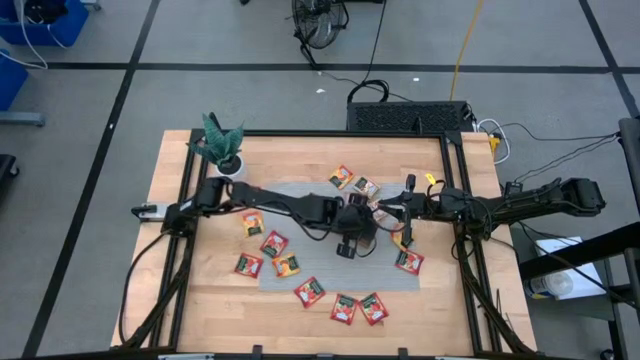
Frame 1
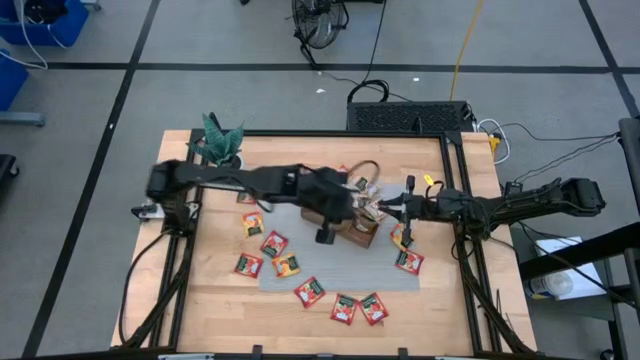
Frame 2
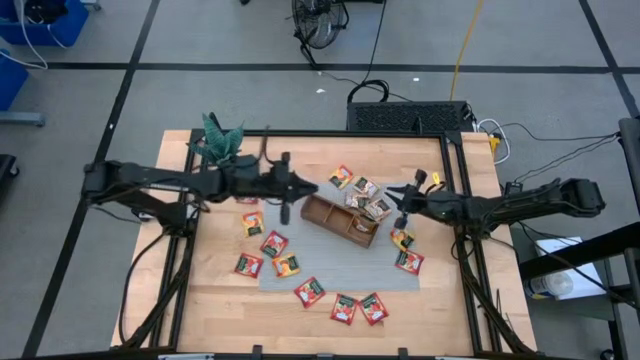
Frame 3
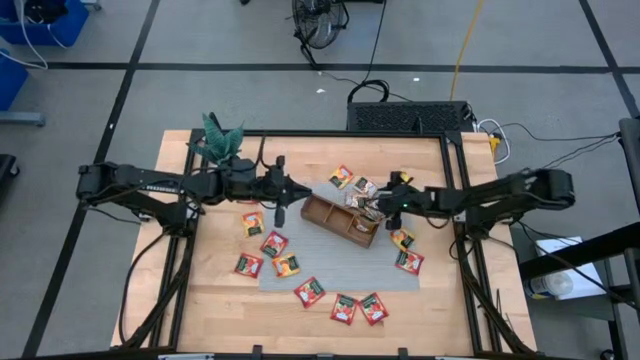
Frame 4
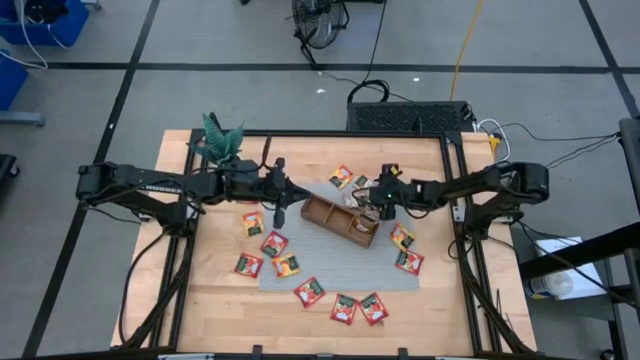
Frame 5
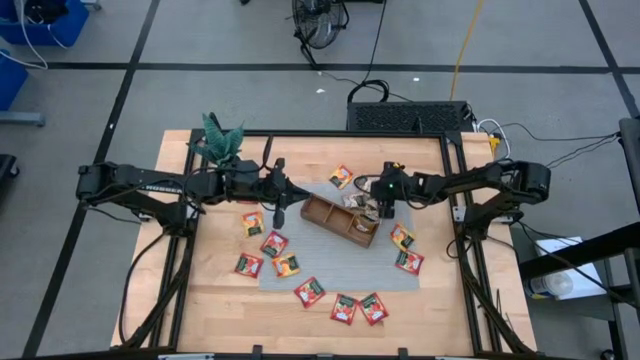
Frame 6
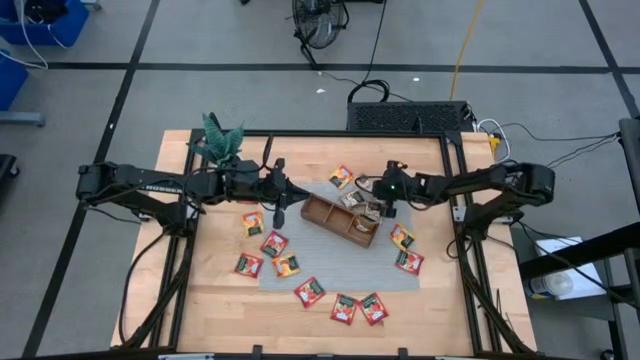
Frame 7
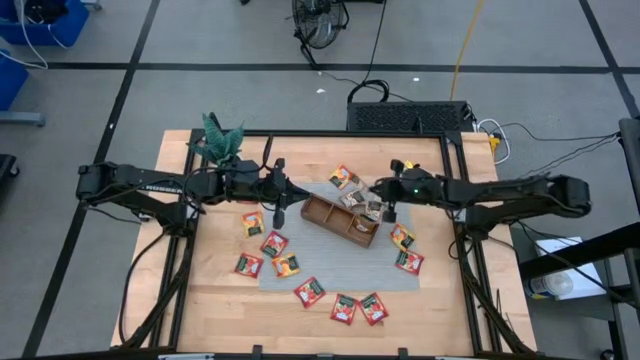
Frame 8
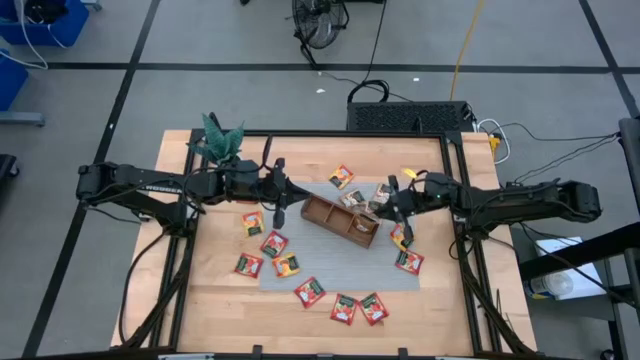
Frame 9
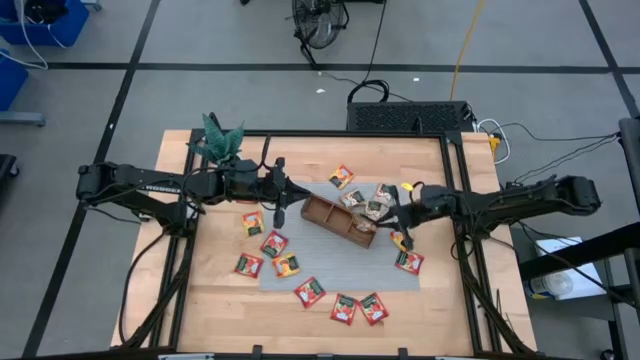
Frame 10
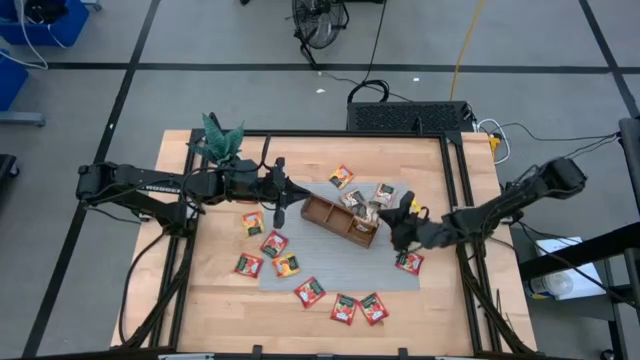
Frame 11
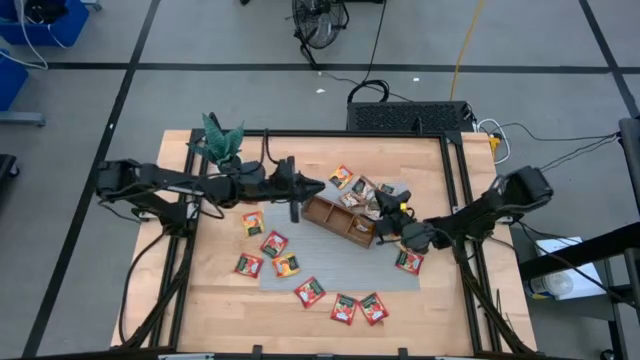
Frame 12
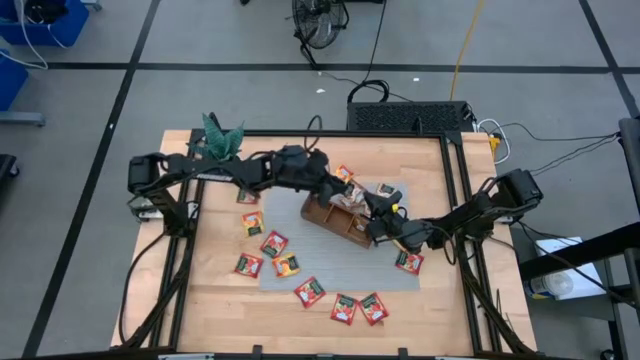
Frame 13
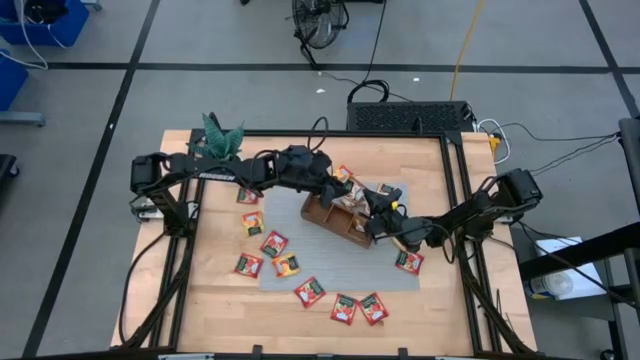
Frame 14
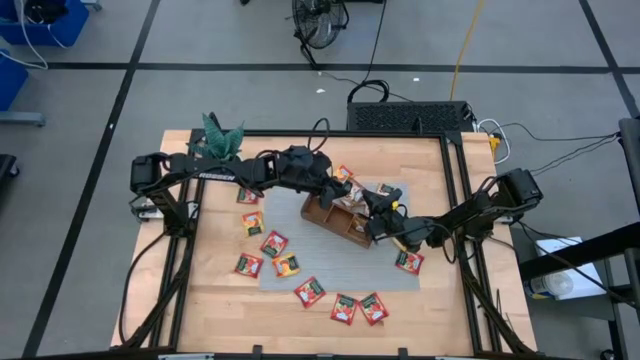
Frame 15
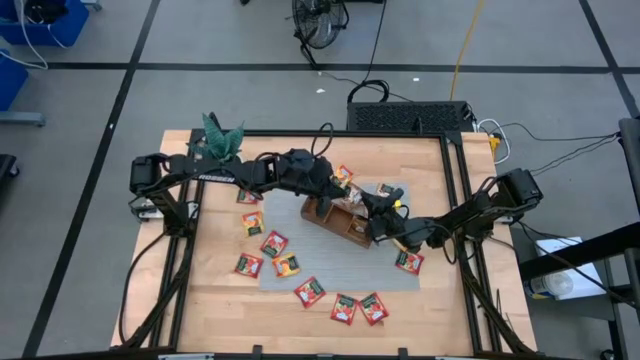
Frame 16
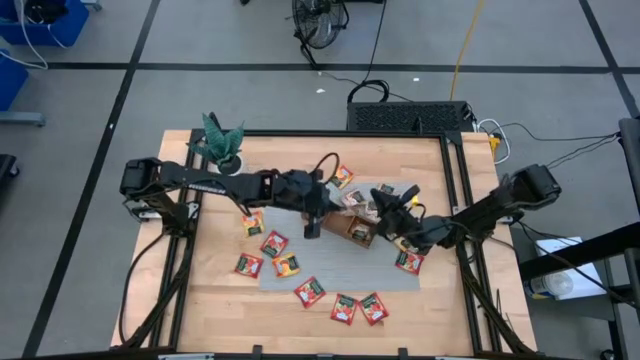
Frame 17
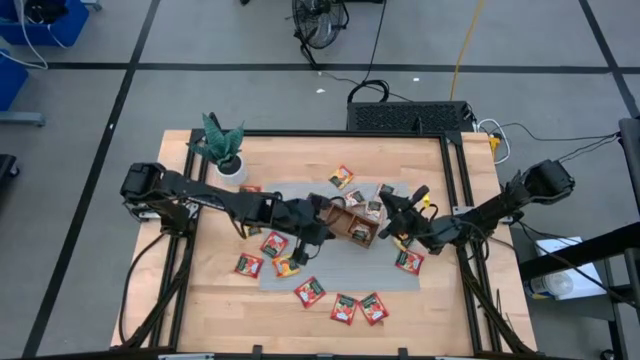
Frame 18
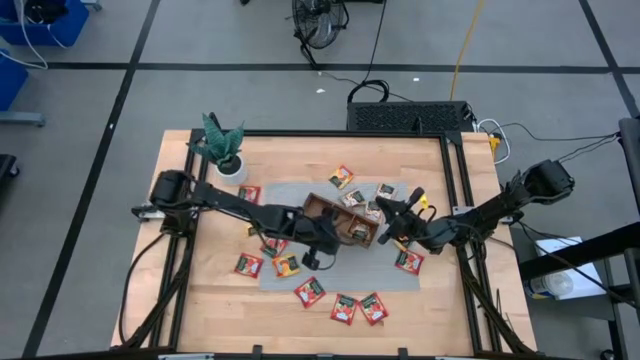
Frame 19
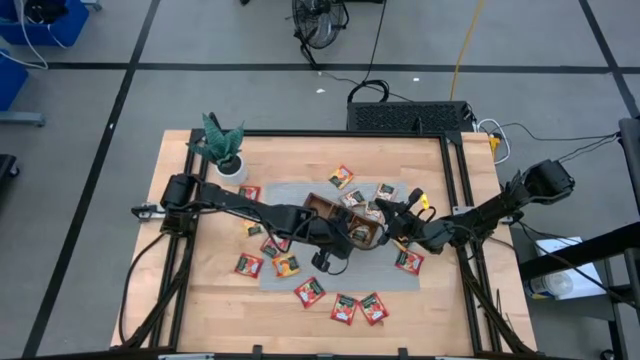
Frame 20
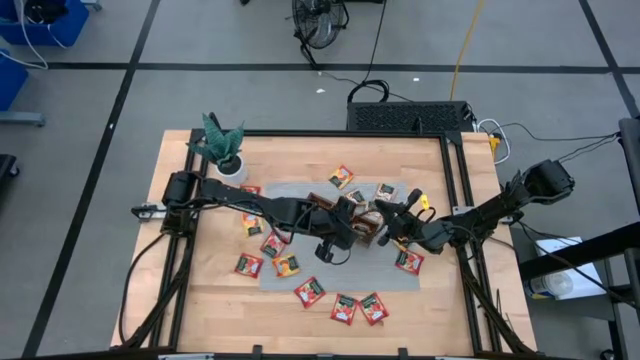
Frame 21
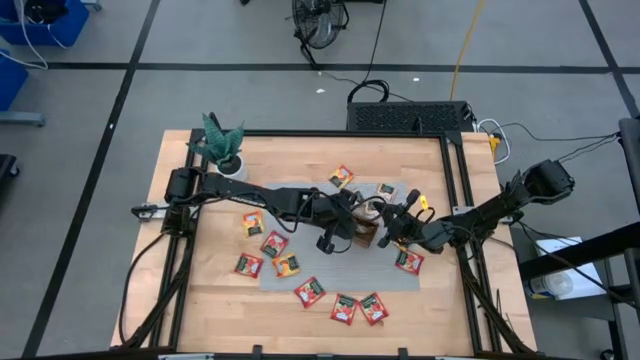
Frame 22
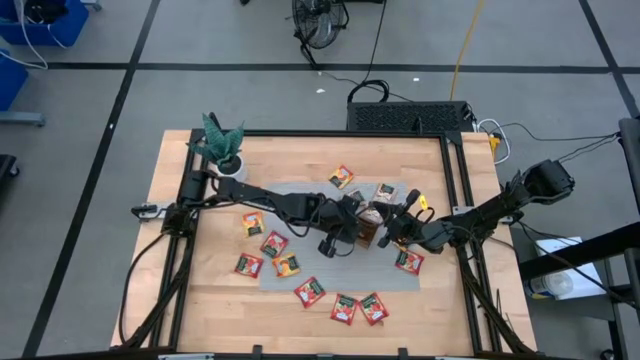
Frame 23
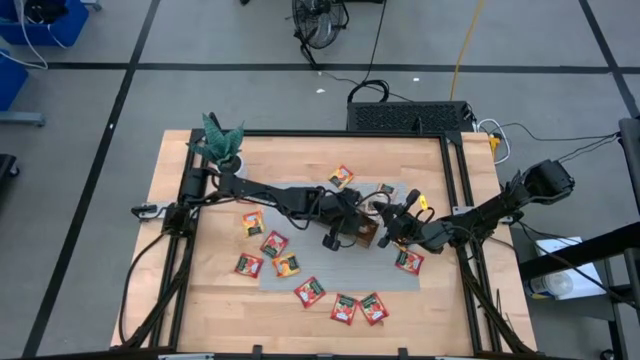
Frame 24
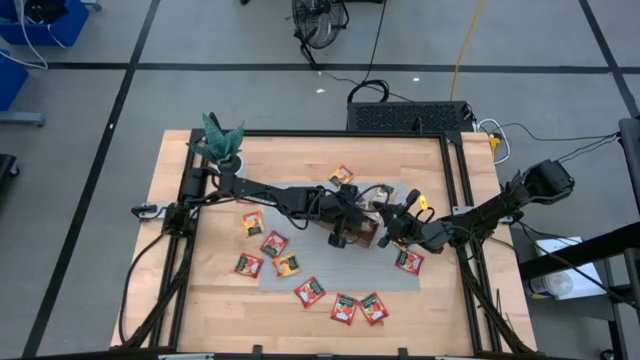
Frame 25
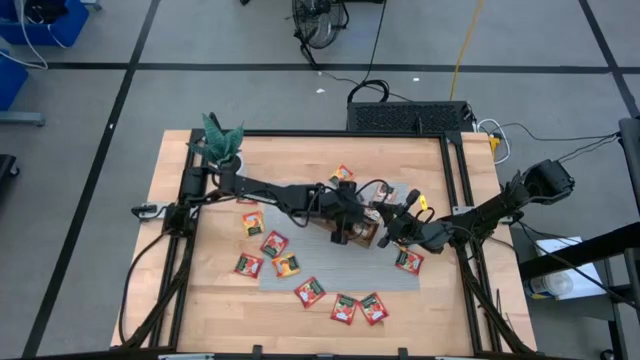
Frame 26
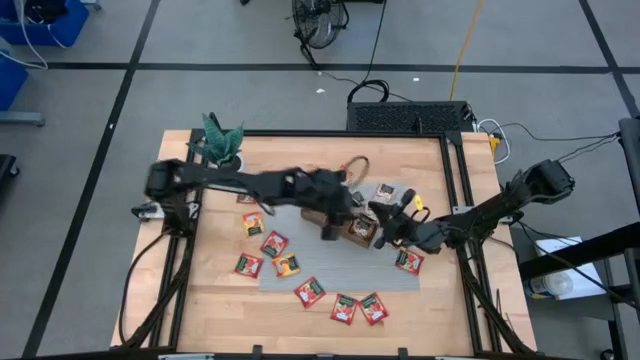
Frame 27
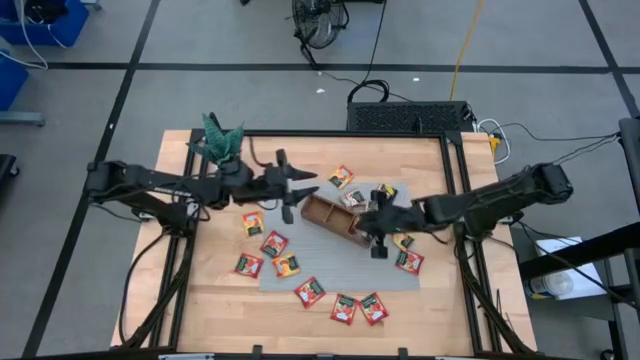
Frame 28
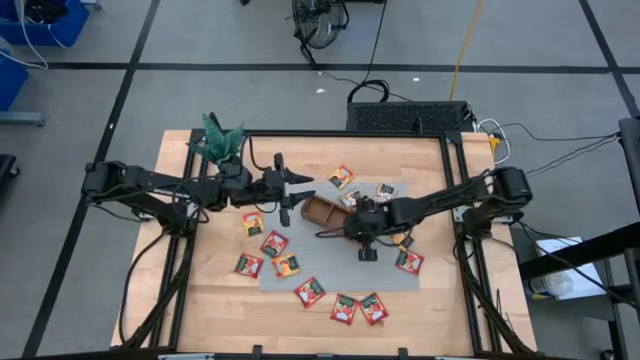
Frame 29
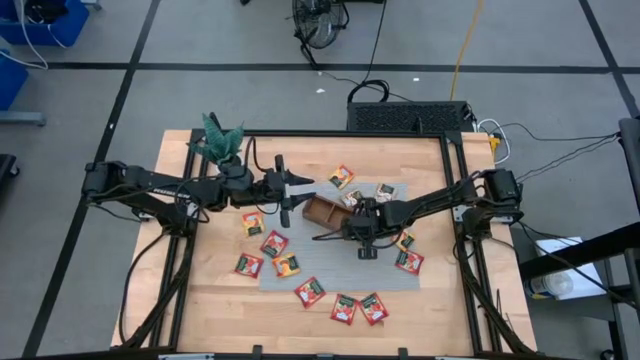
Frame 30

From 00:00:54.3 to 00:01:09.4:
Task: Pick & Place Tea
Put the brown tea into the right part of the wooden organizer

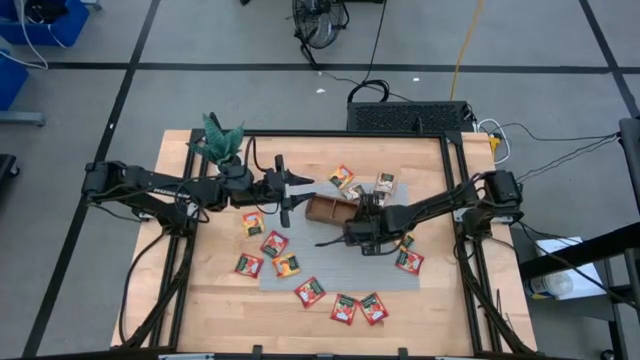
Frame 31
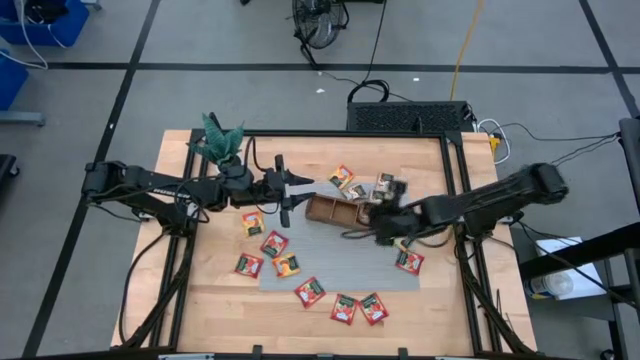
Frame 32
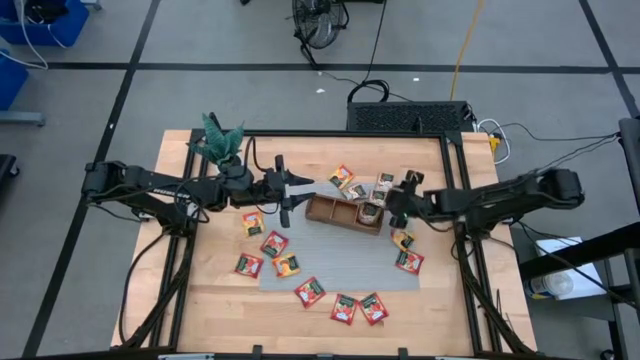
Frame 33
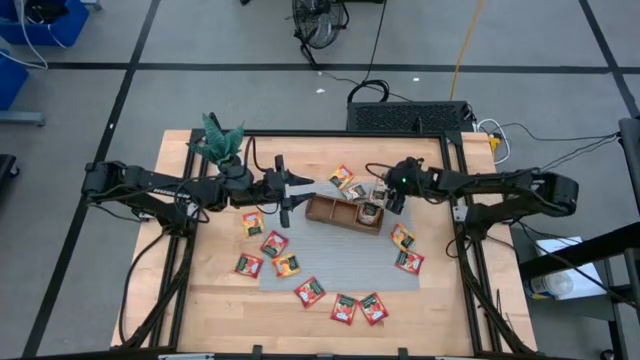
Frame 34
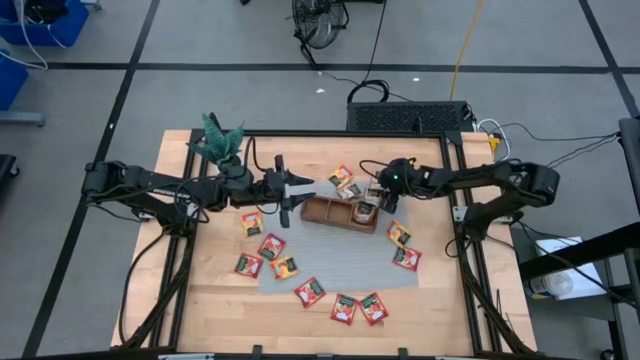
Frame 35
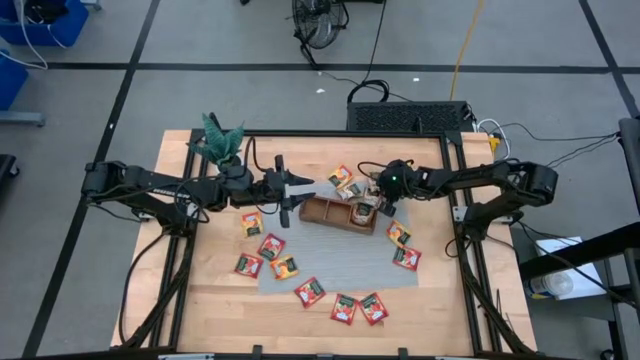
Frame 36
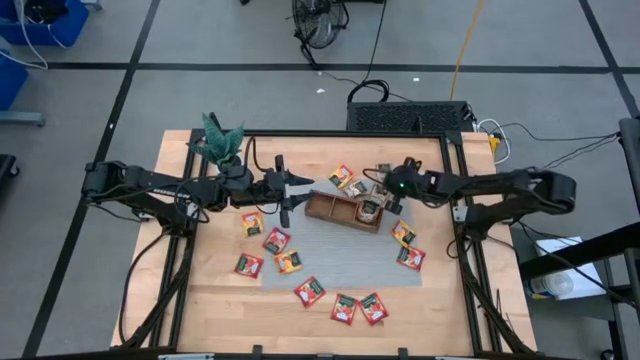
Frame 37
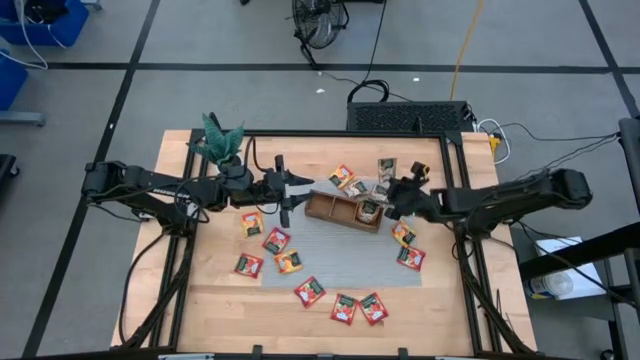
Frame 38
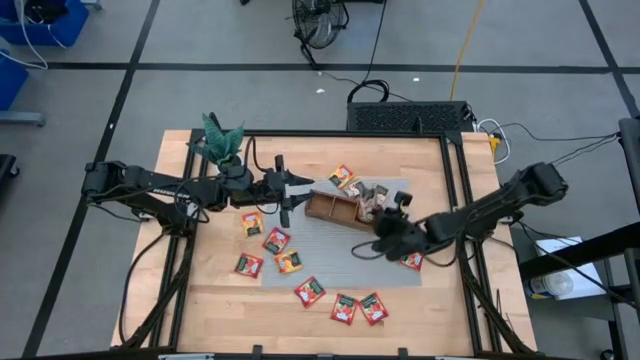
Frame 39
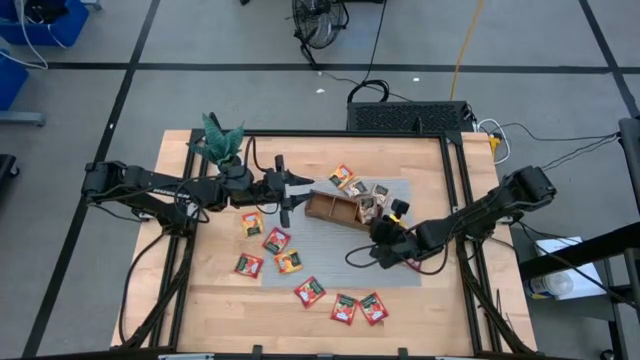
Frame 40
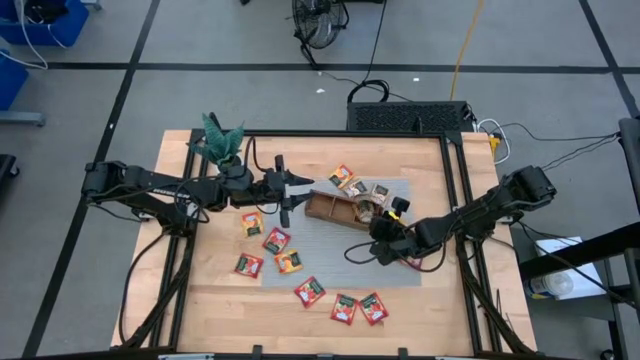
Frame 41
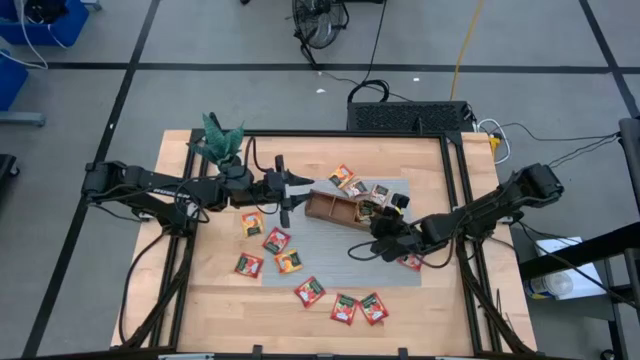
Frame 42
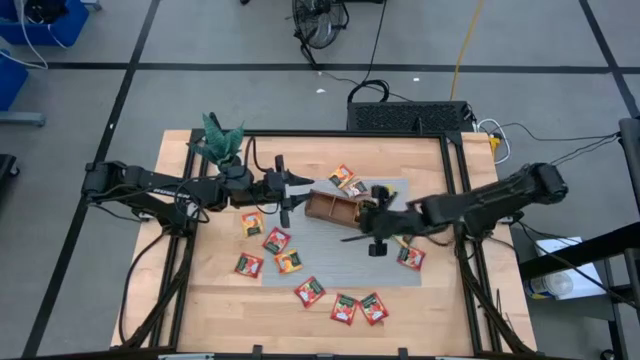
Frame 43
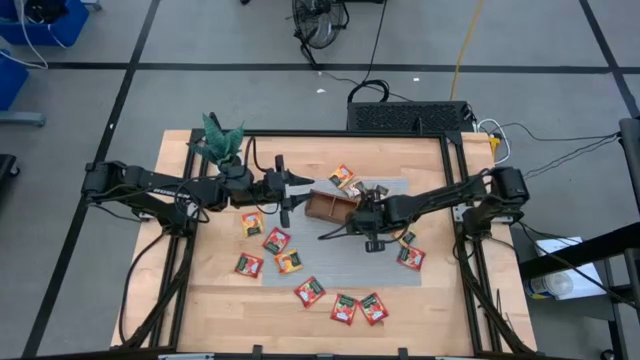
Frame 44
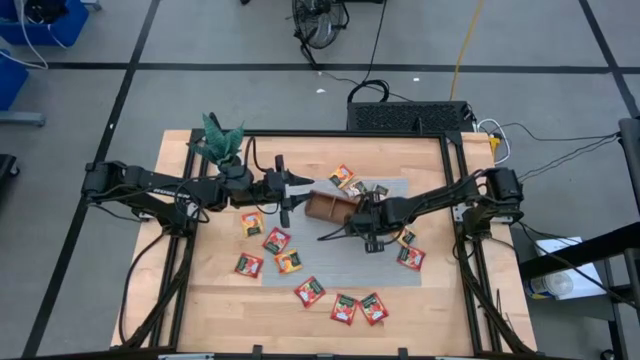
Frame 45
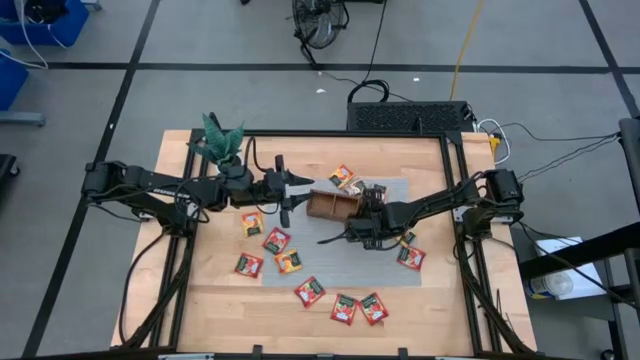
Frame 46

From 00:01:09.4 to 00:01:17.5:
Put the brown tea into the right part of the wooden organizer
